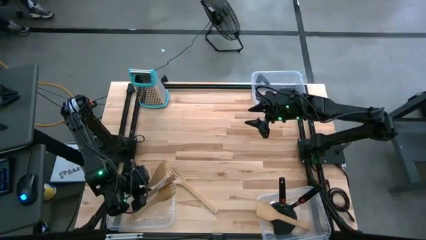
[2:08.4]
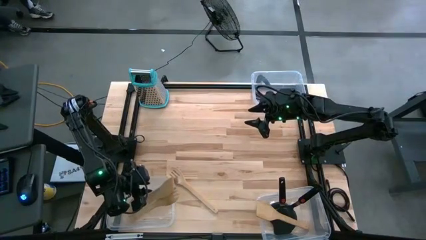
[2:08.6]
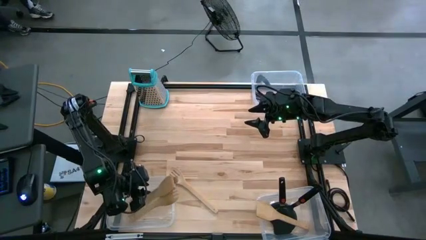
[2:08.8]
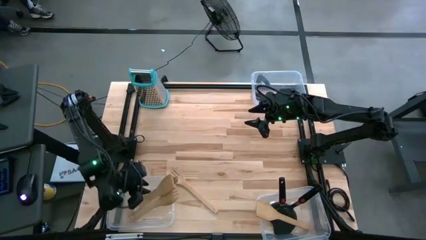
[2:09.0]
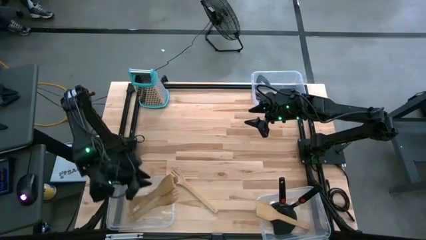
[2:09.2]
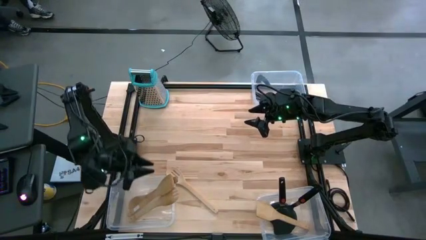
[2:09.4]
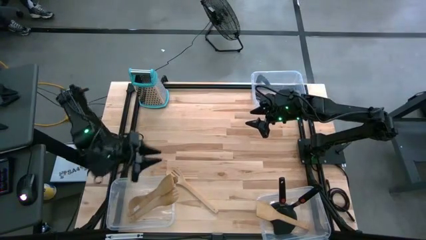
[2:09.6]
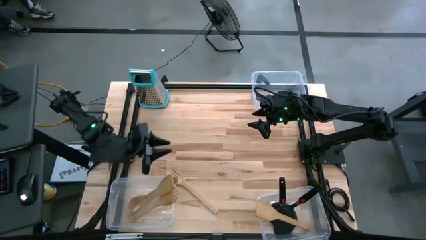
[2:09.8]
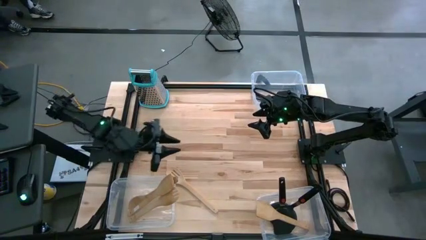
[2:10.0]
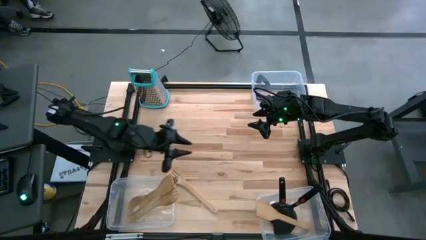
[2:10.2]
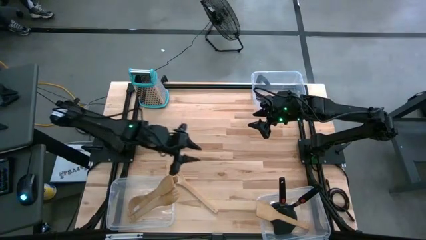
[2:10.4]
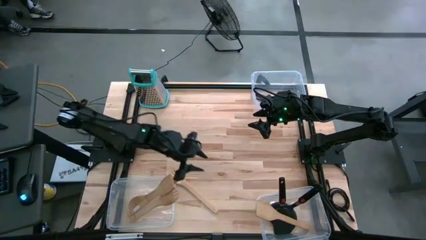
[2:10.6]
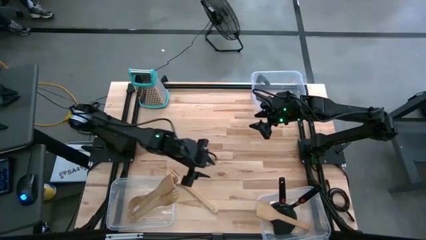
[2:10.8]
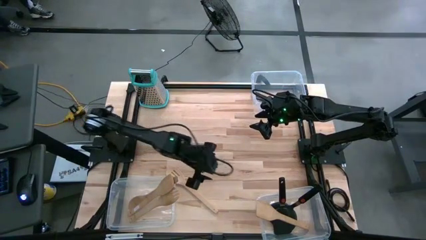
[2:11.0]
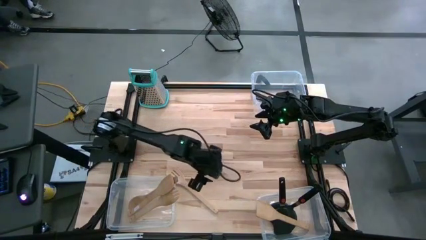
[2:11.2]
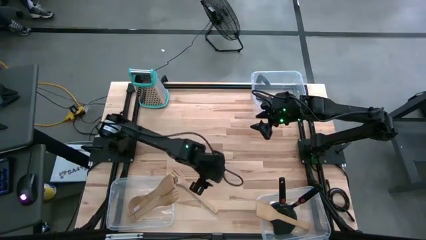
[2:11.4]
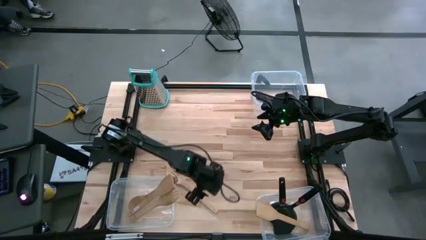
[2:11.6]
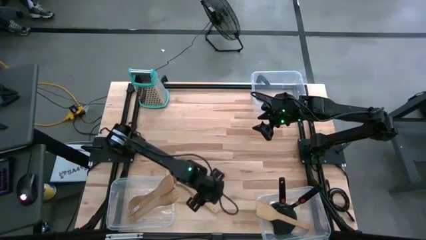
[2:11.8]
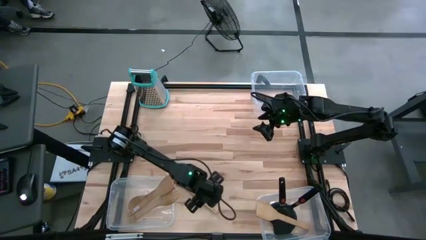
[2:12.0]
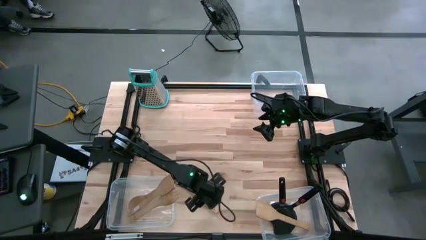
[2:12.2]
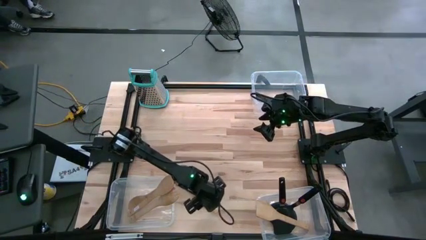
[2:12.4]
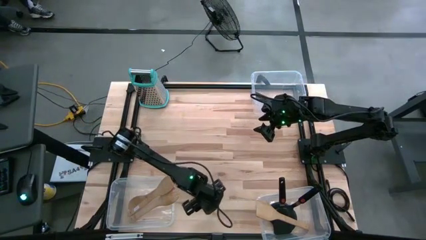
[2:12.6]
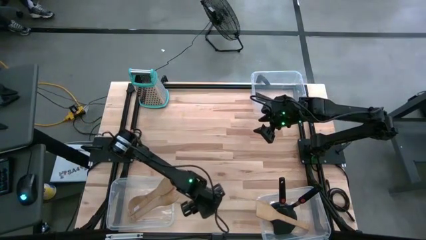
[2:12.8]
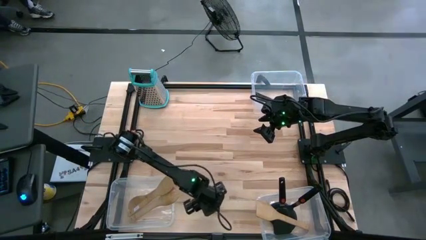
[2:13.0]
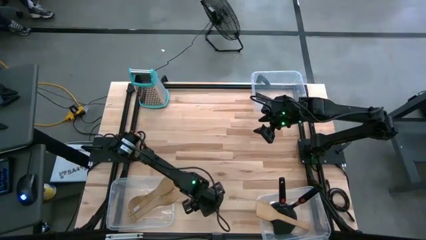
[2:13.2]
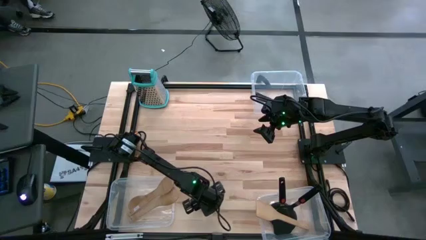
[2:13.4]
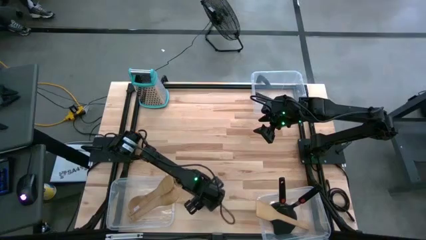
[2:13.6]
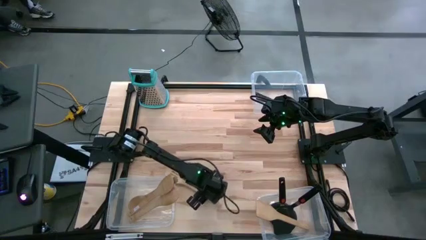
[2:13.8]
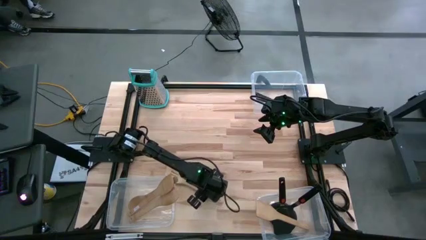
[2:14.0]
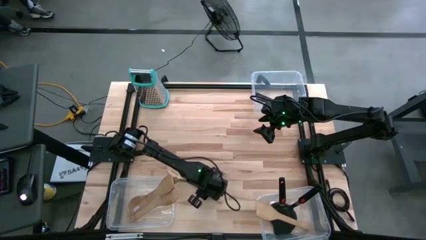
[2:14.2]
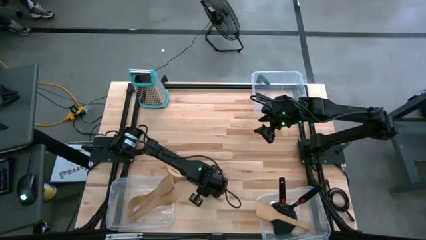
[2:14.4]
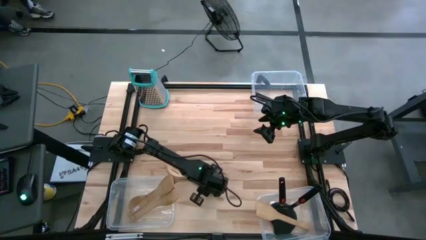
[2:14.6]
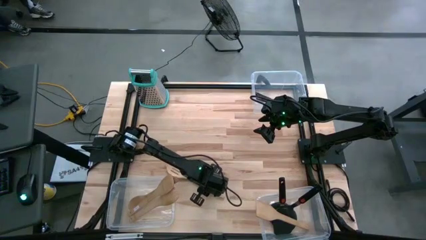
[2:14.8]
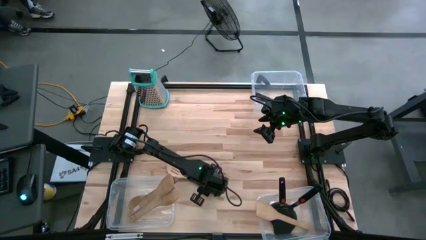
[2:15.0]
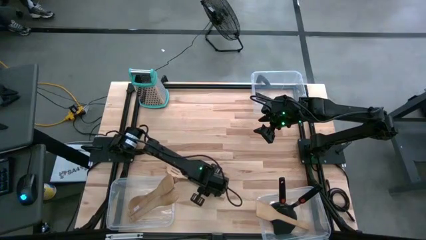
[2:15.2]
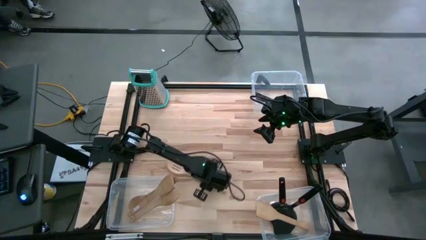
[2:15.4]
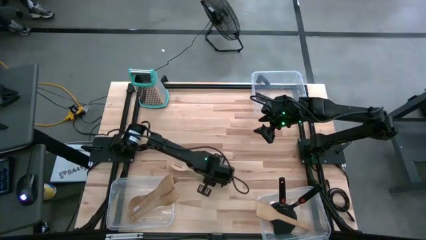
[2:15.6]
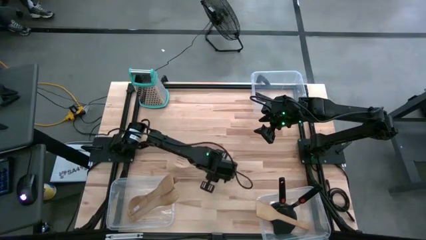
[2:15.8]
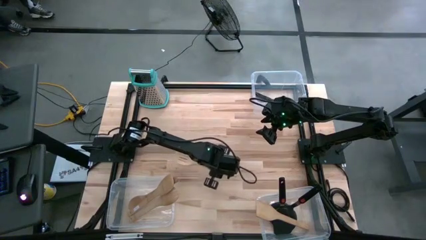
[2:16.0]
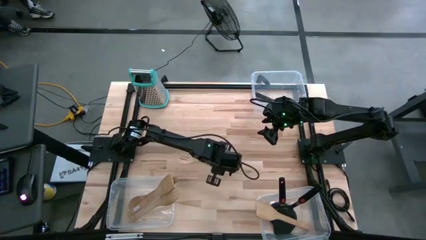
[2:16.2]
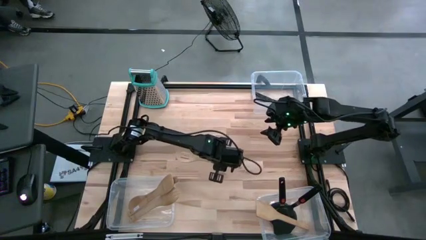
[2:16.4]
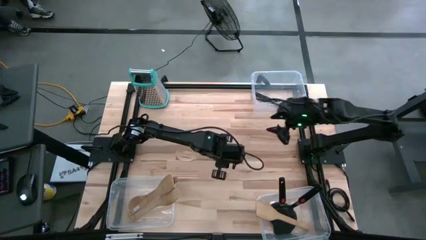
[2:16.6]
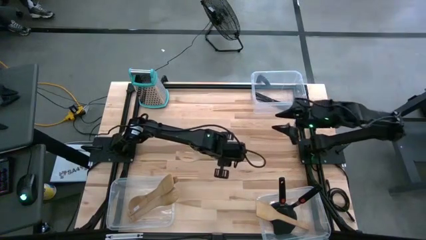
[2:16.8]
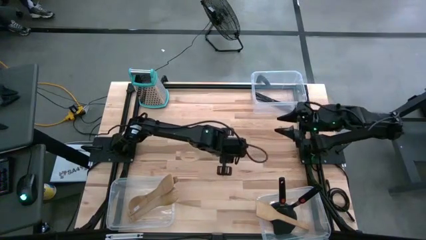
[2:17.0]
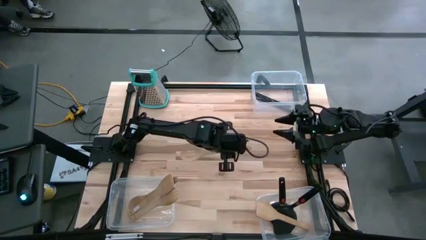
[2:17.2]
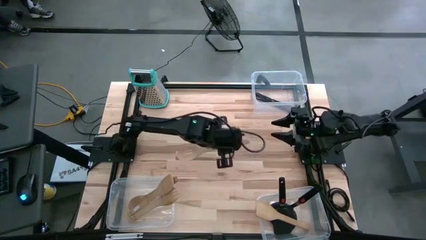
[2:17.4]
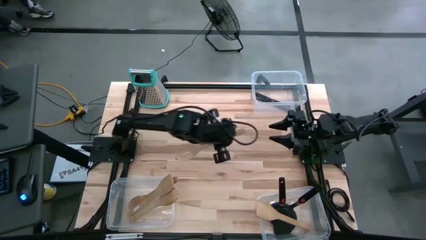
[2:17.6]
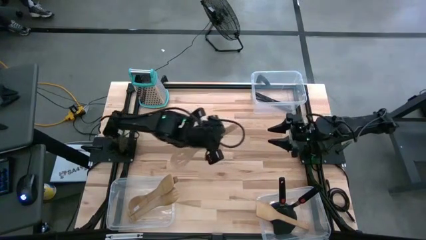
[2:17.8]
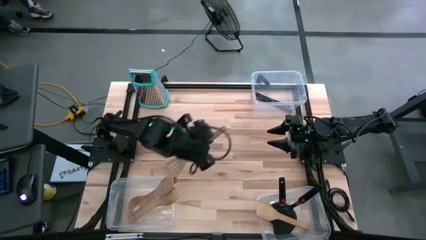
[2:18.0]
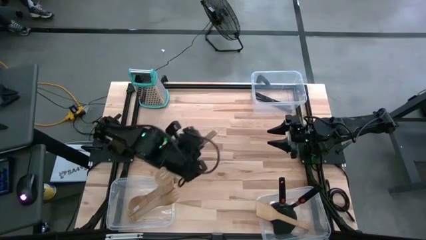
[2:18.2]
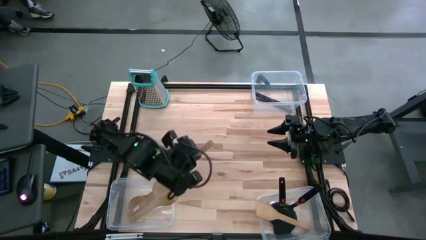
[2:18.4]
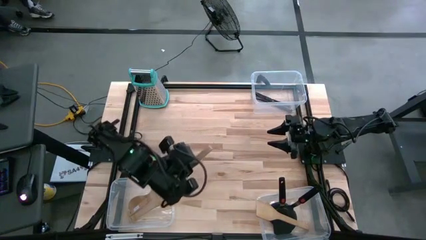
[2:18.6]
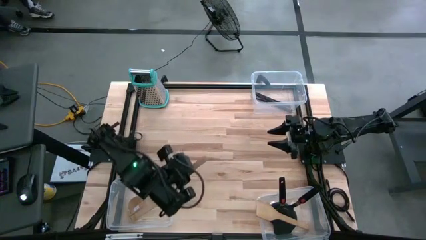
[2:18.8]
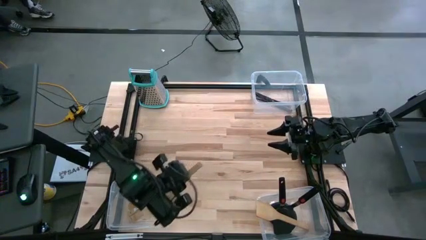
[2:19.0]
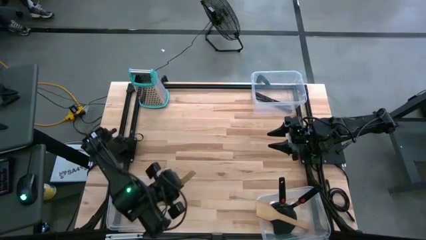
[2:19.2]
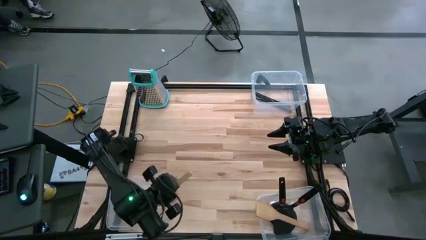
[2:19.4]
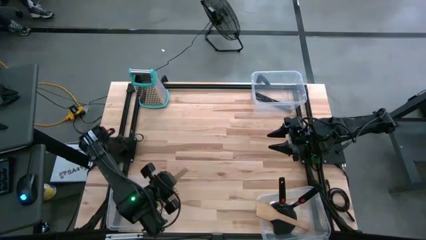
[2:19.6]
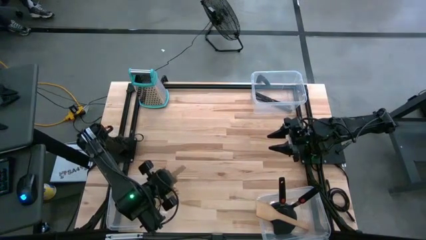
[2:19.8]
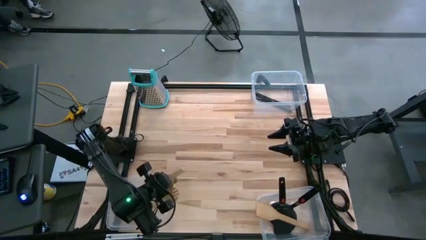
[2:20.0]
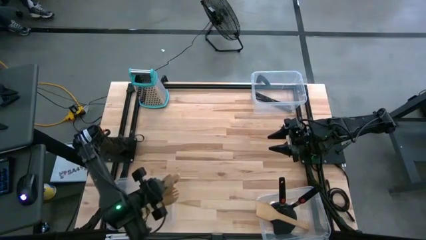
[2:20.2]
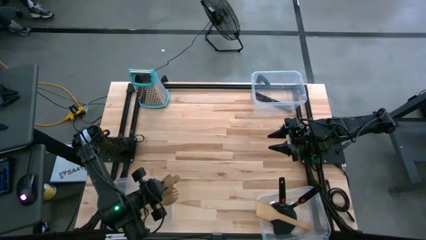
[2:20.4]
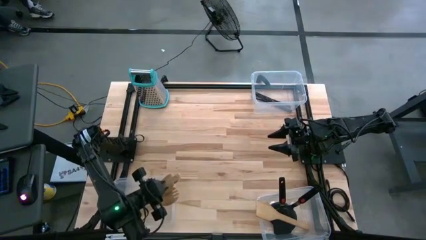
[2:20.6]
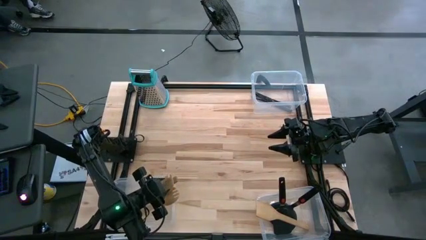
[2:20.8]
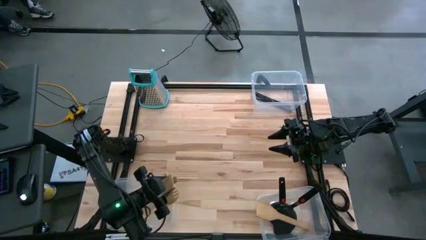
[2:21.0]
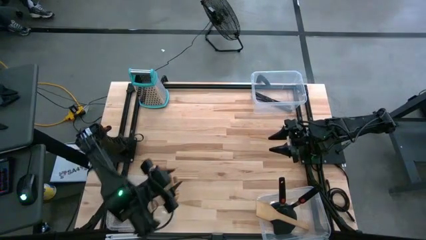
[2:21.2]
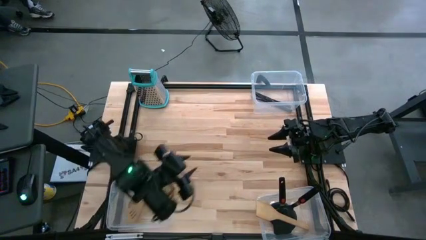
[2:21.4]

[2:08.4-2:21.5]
Task: Pick & Place Kitchen Items
Put the light brown slotted serving spoon into the bottom left transparent bin

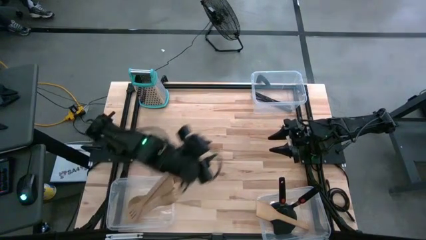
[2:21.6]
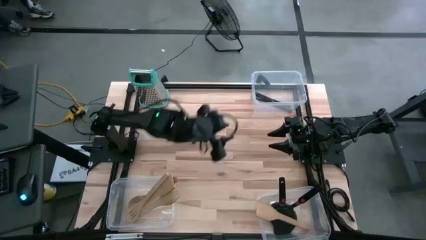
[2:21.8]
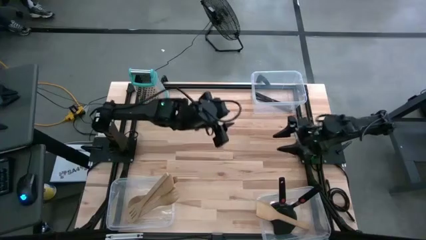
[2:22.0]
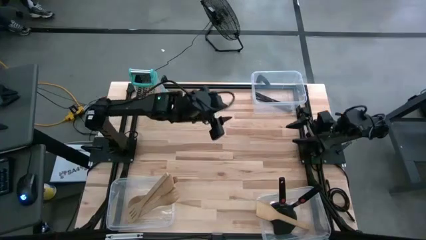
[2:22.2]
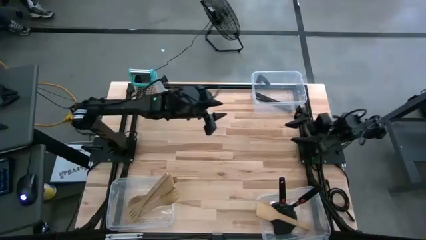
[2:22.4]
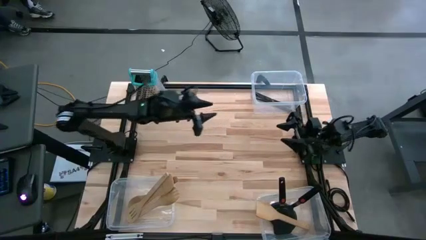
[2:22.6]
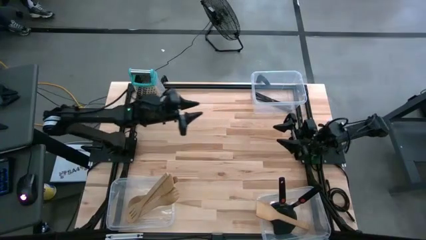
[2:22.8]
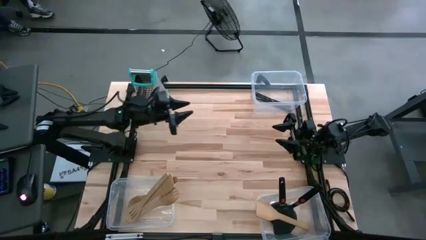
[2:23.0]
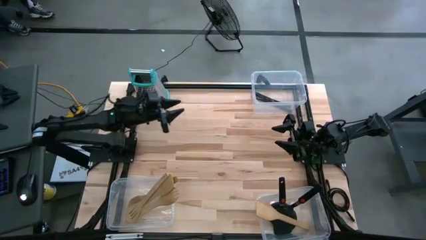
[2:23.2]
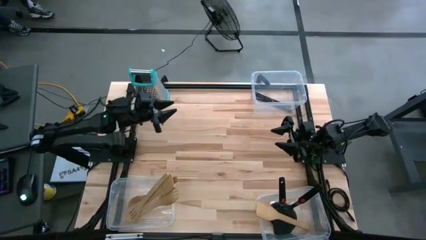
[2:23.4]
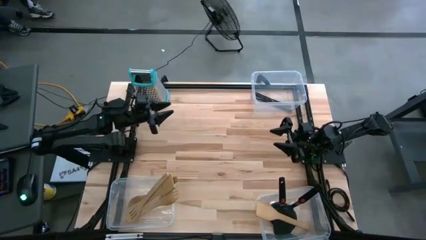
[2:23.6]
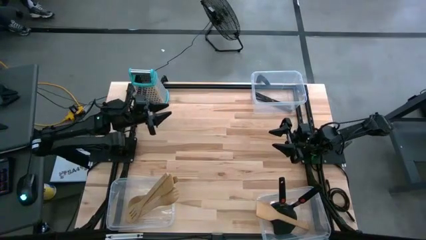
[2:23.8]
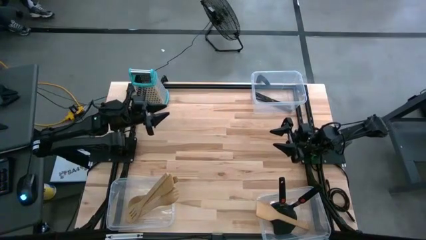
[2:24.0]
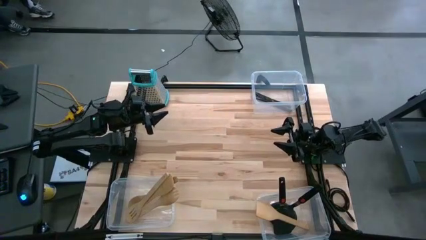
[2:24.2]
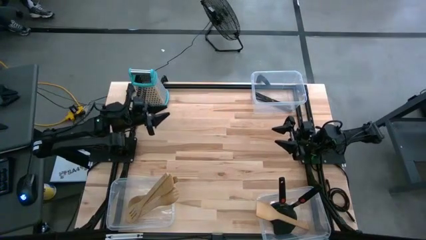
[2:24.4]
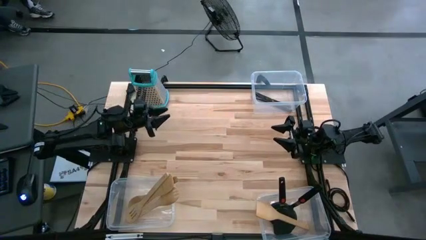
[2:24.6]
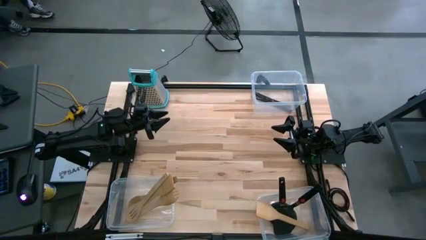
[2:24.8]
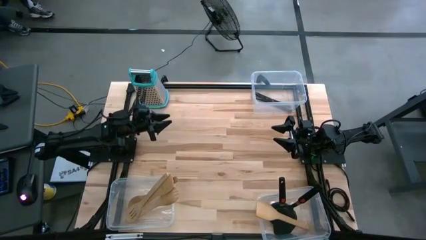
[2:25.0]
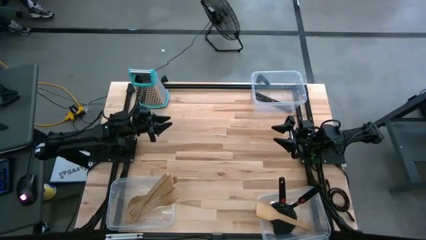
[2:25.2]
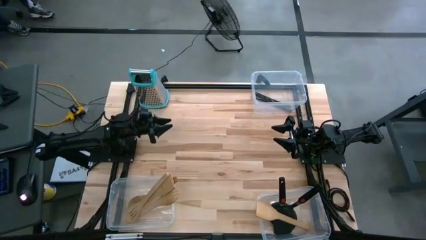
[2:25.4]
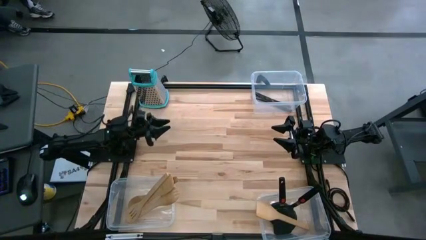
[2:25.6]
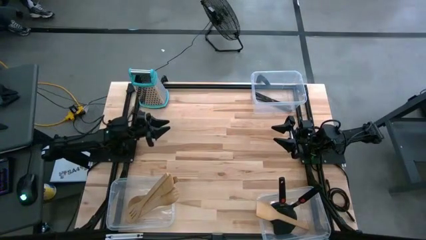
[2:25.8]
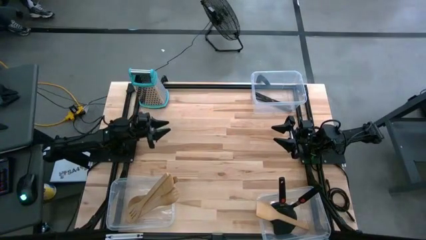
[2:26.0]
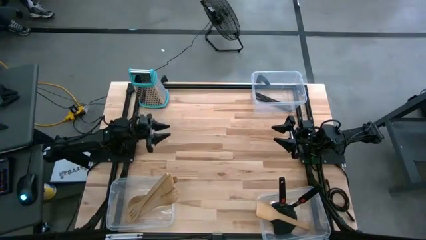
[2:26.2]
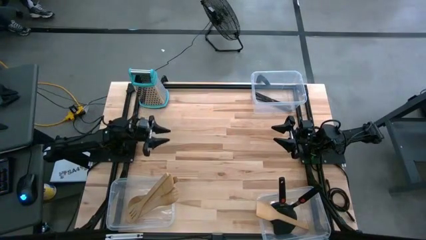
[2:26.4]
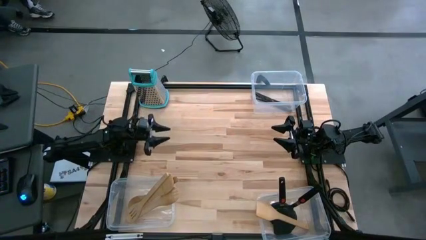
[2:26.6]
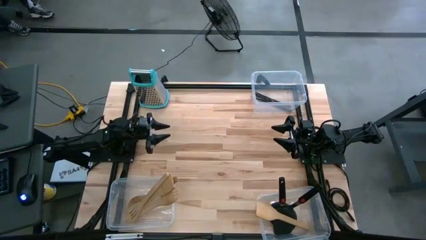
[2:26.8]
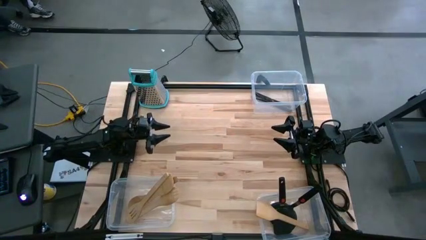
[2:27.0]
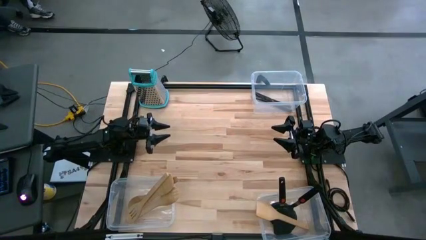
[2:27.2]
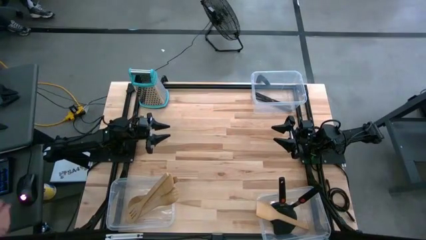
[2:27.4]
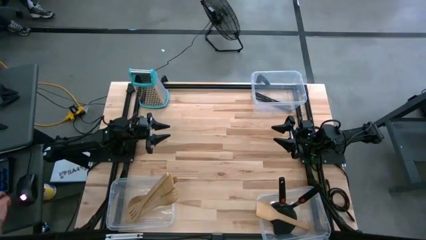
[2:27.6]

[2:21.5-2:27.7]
Return to home position
